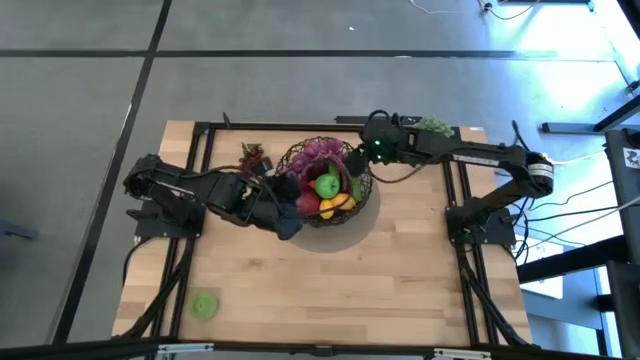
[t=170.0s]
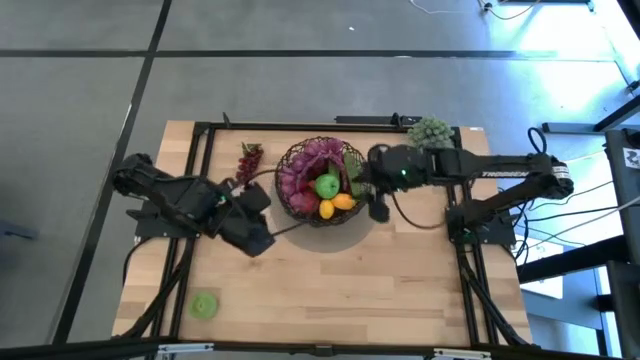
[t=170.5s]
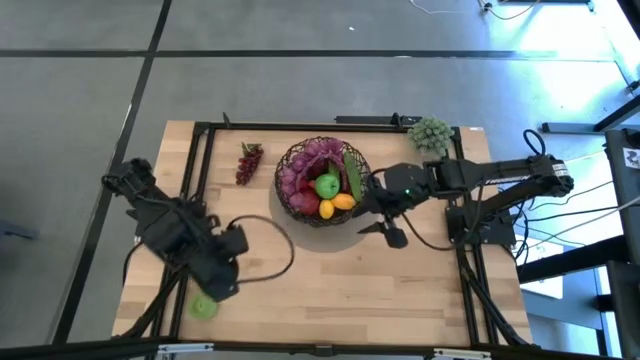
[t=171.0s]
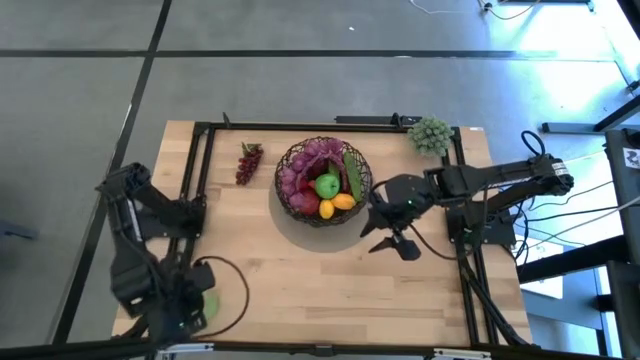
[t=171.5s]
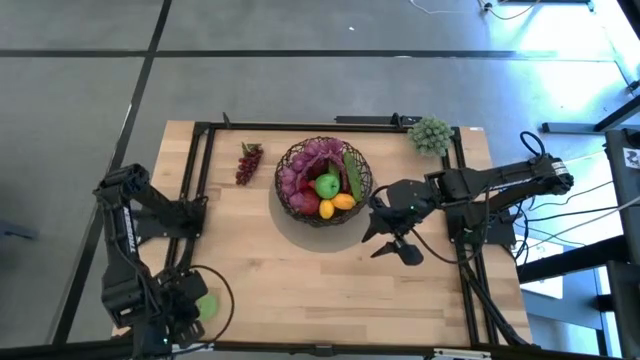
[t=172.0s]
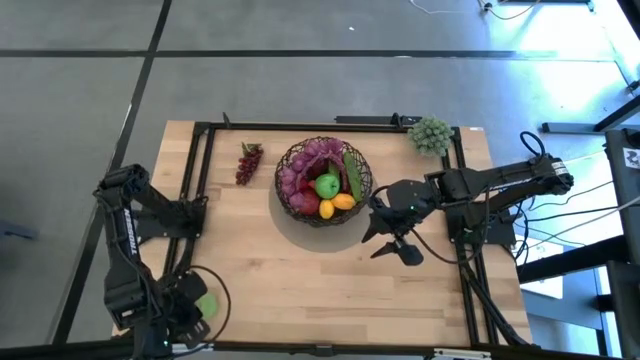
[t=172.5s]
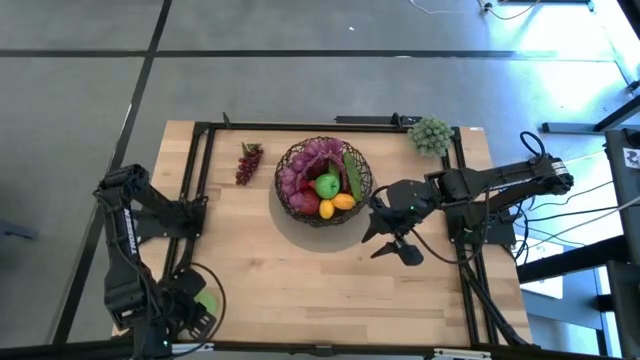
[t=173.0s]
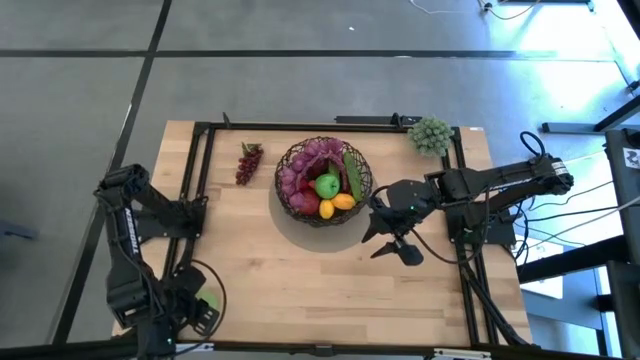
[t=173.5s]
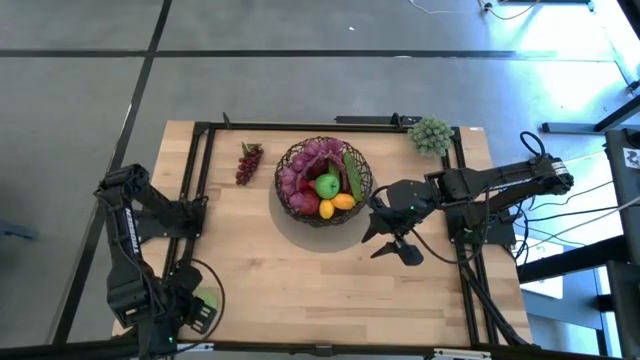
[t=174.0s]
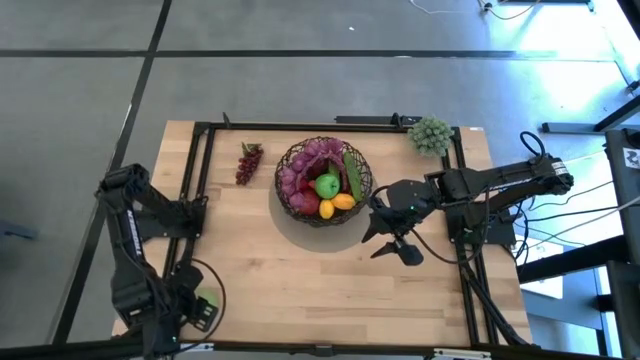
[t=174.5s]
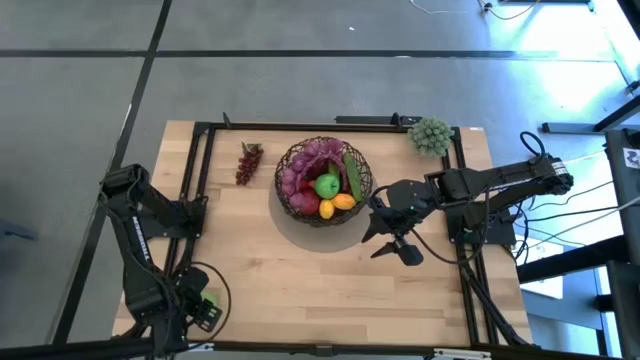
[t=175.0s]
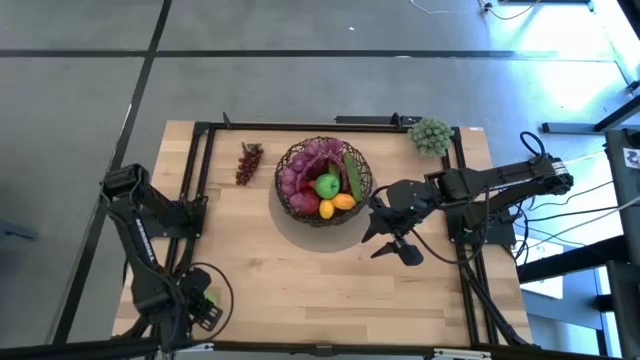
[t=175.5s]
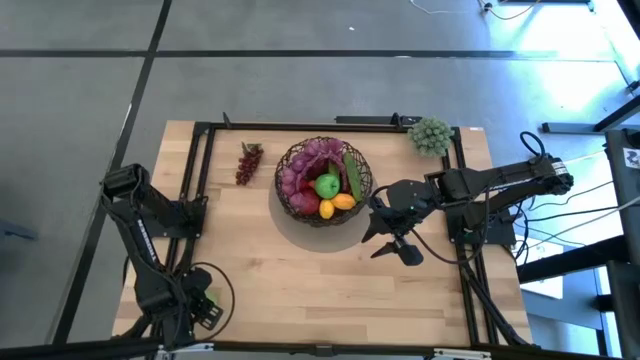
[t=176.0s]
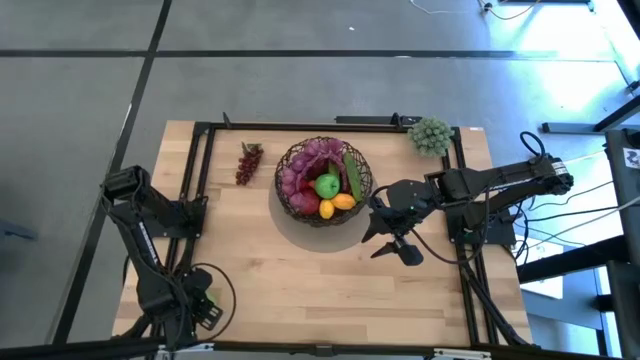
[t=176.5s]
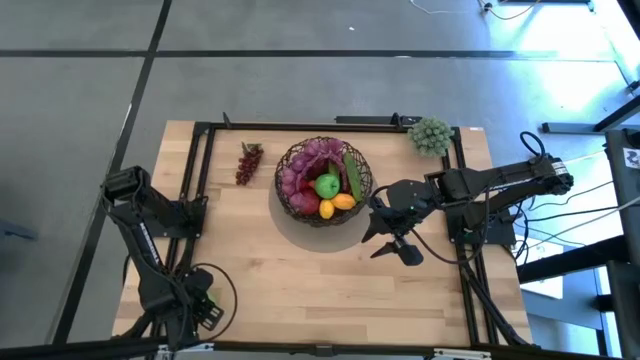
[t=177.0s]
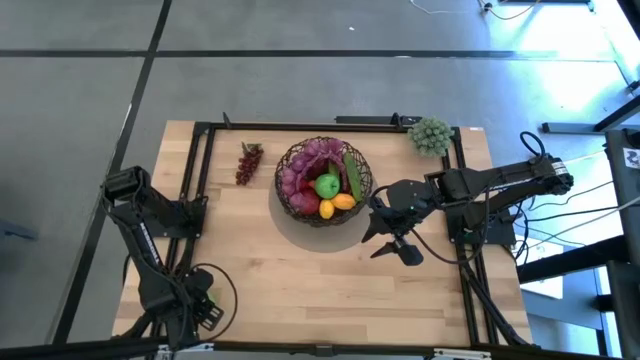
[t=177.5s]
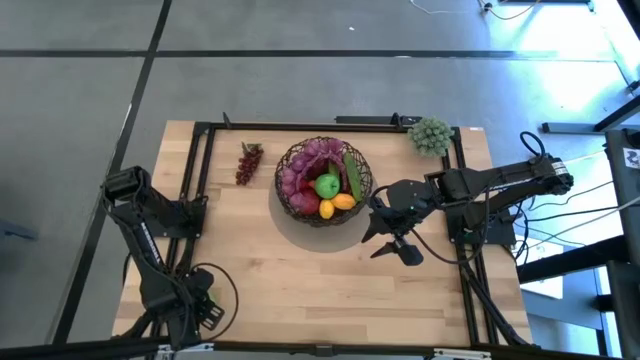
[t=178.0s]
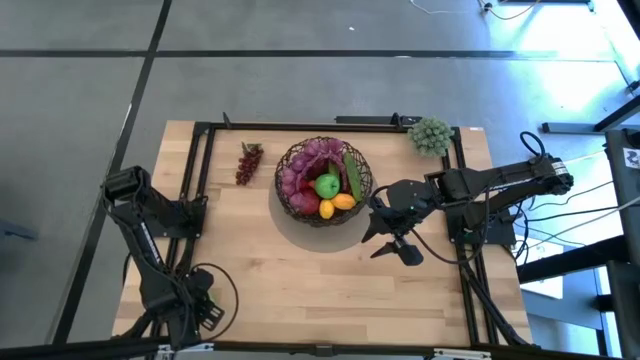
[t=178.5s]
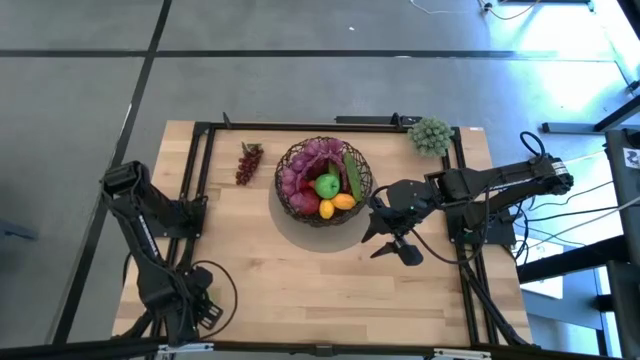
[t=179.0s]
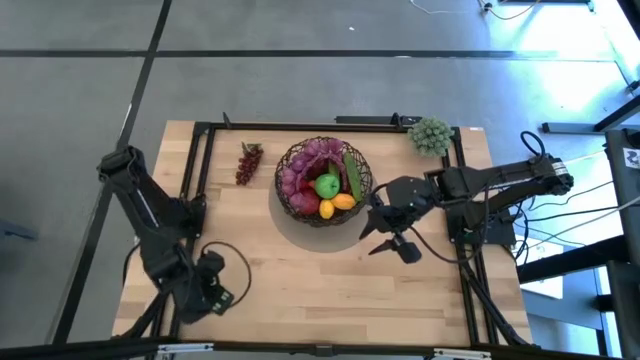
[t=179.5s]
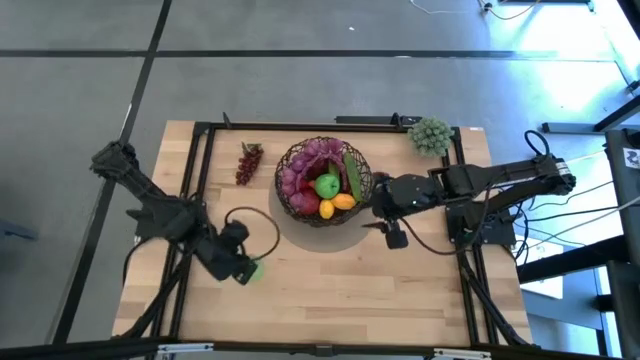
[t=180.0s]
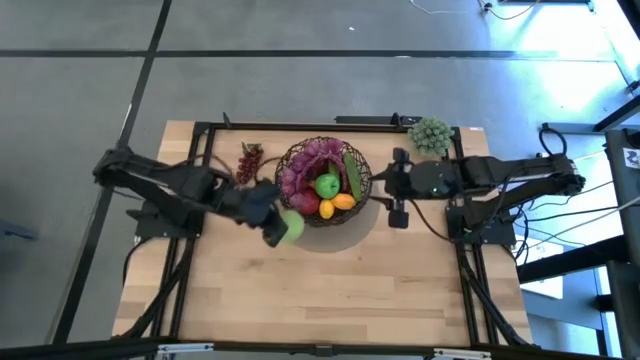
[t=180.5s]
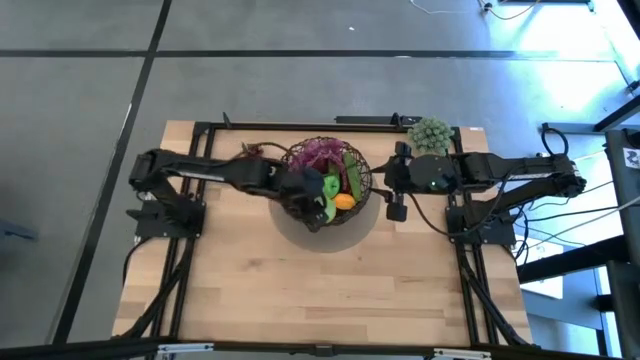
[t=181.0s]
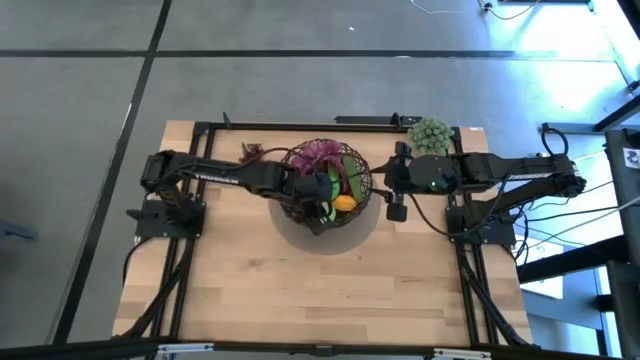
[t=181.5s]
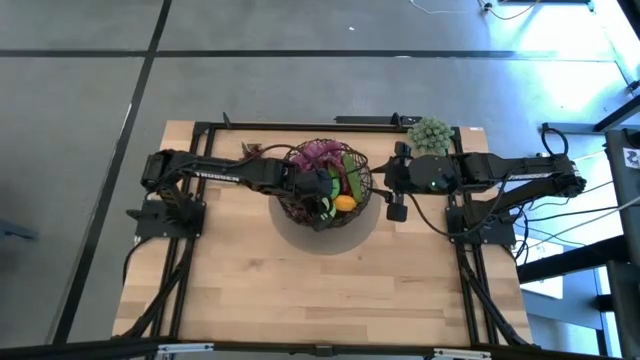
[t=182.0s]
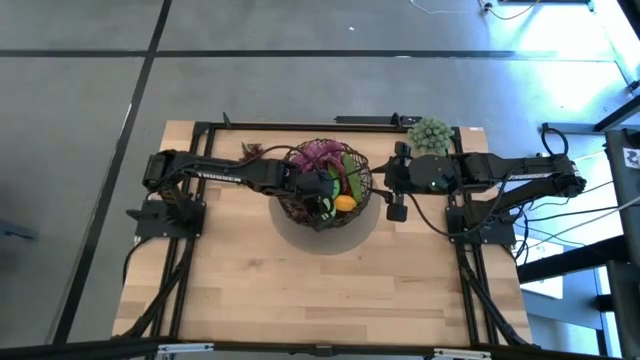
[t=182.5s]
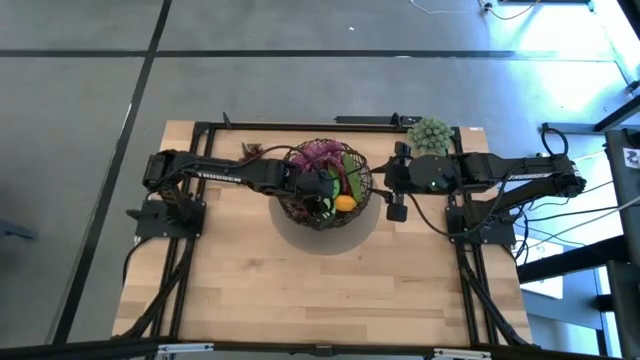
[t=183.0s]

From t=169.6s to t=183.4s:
Task: Build produce basket
Put the pear into the wire basket
